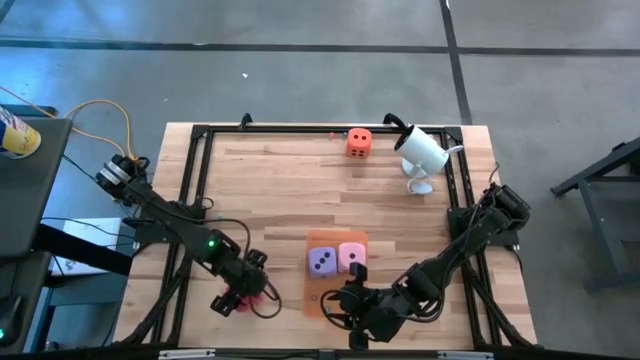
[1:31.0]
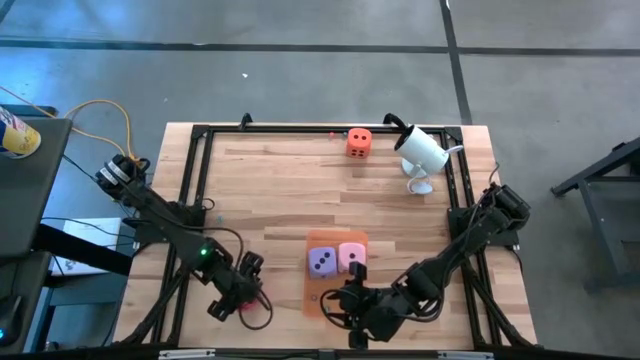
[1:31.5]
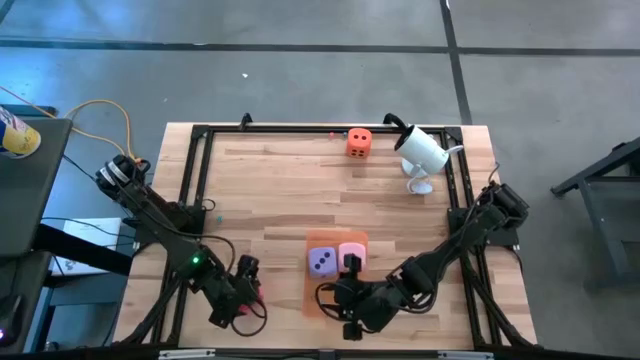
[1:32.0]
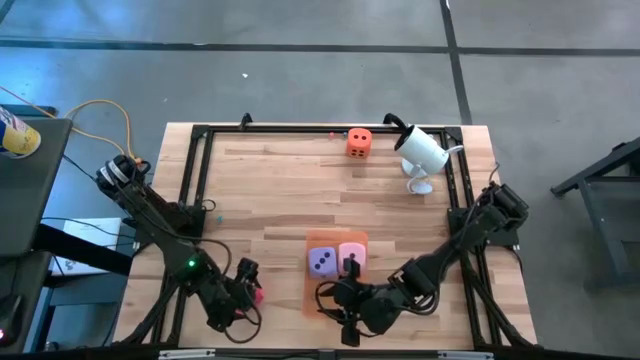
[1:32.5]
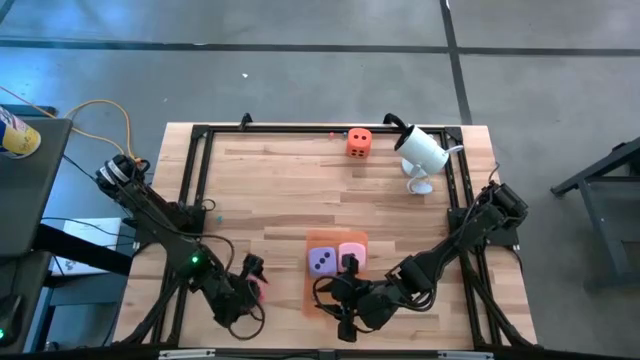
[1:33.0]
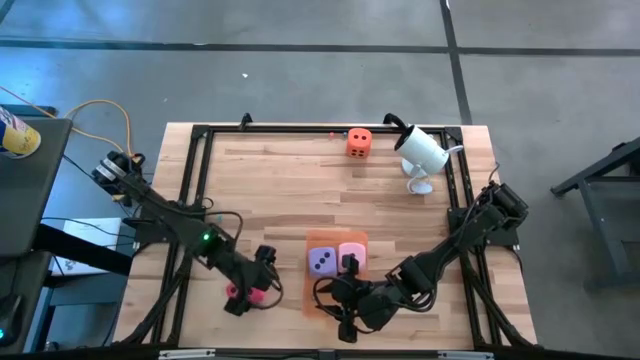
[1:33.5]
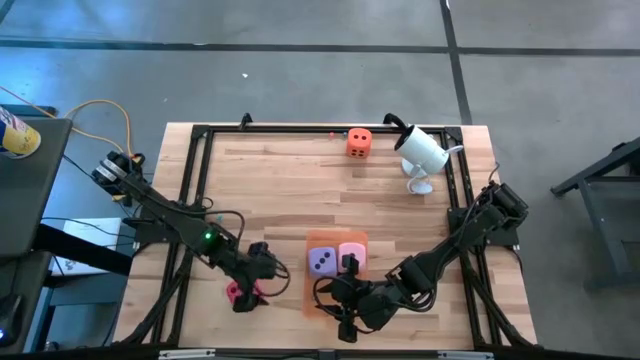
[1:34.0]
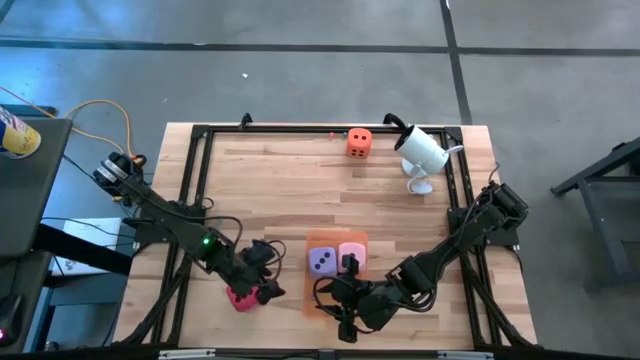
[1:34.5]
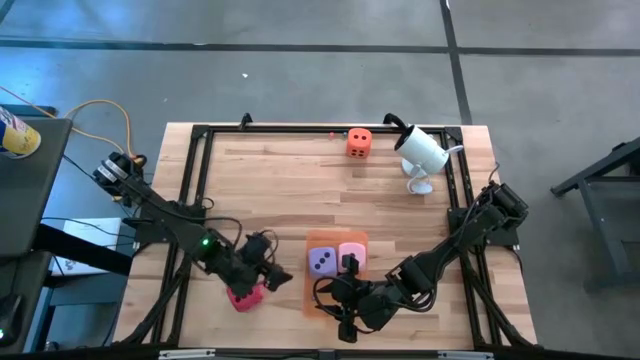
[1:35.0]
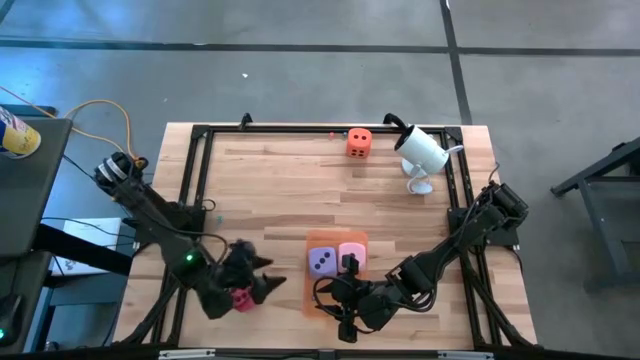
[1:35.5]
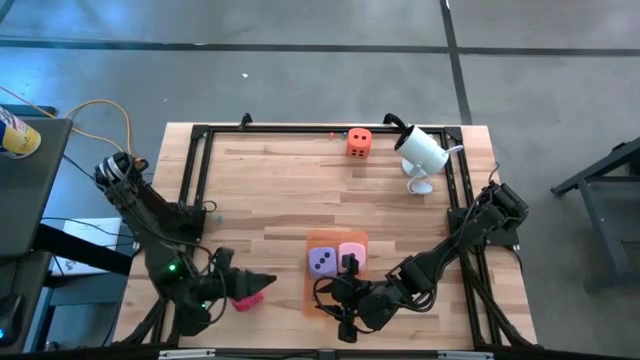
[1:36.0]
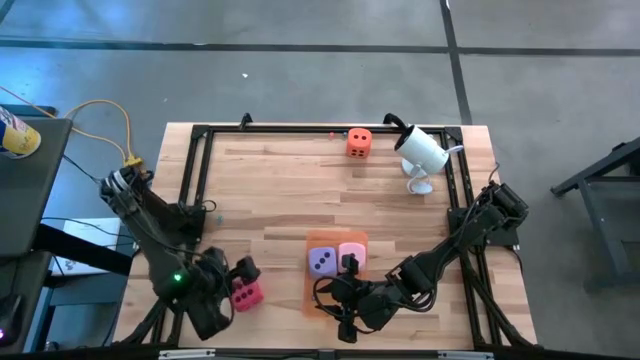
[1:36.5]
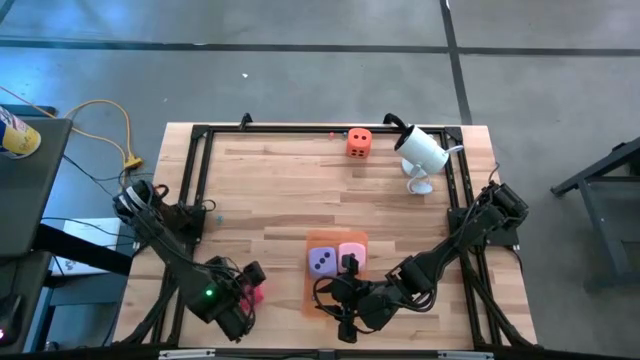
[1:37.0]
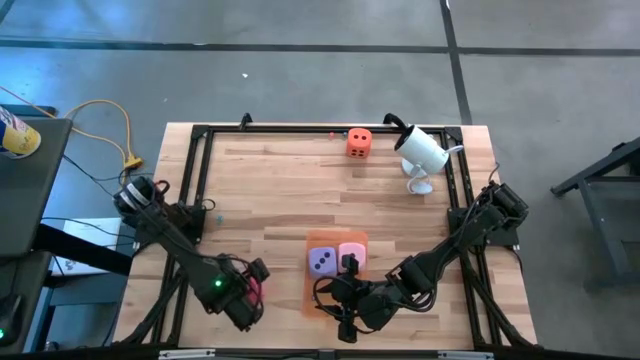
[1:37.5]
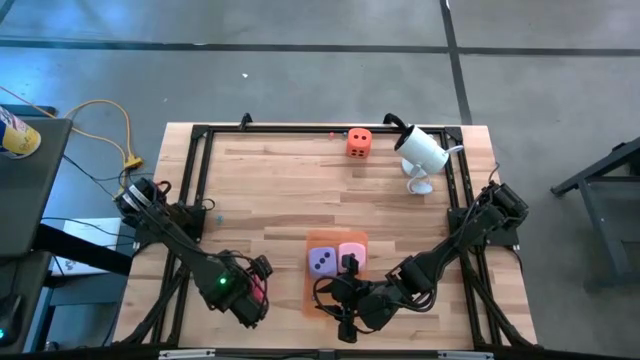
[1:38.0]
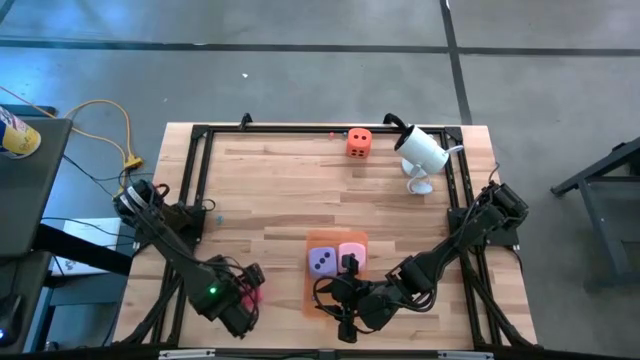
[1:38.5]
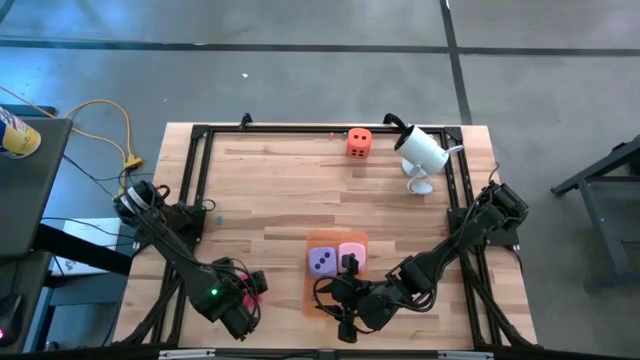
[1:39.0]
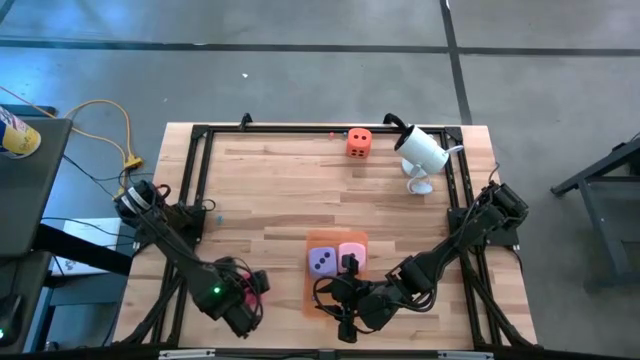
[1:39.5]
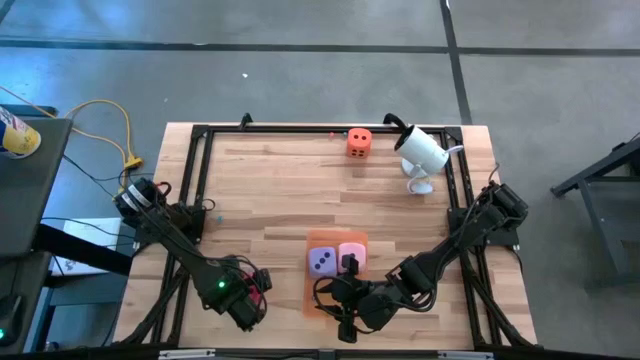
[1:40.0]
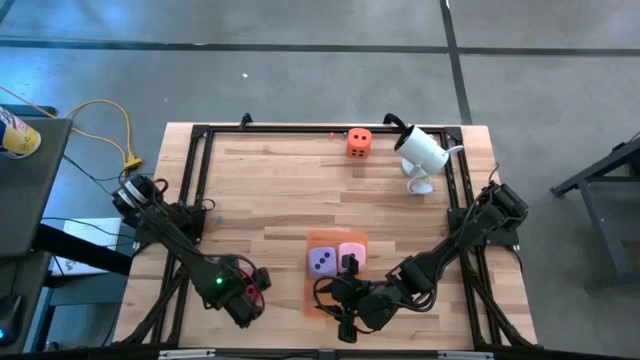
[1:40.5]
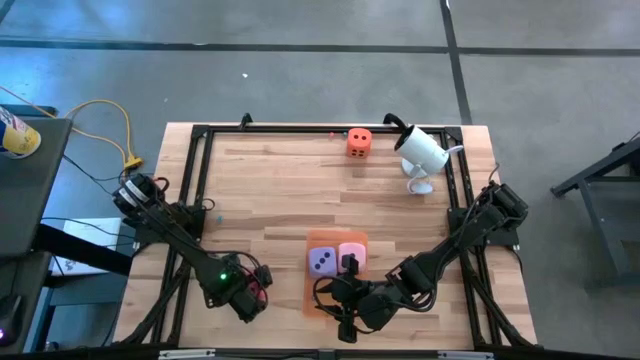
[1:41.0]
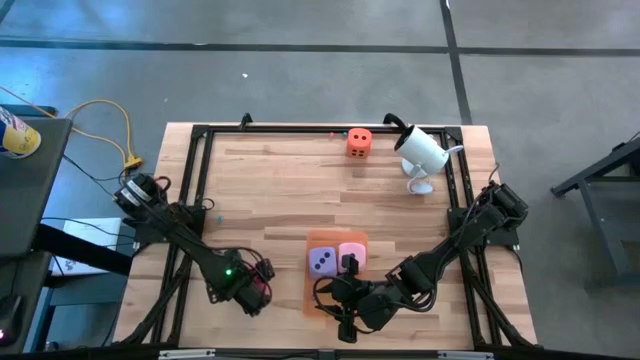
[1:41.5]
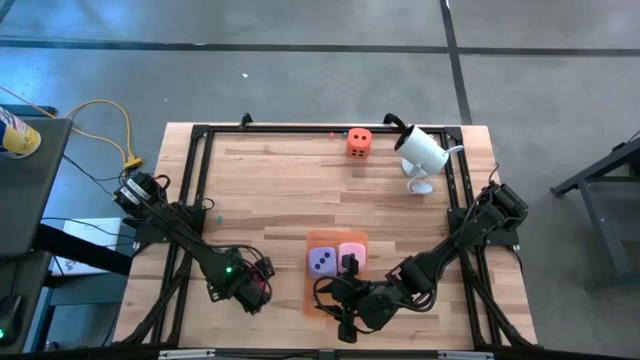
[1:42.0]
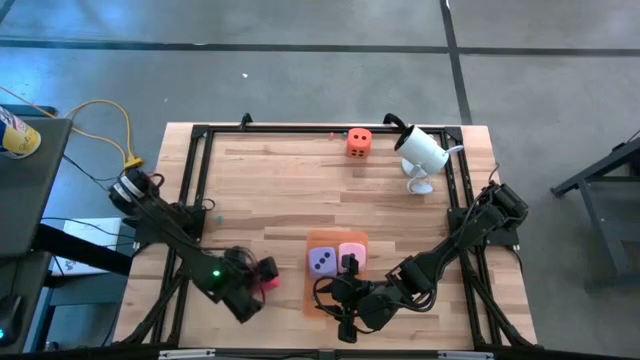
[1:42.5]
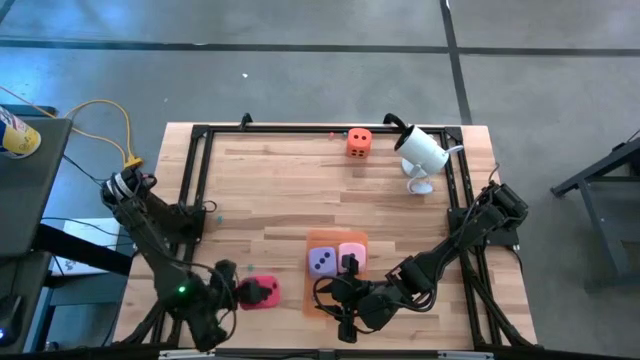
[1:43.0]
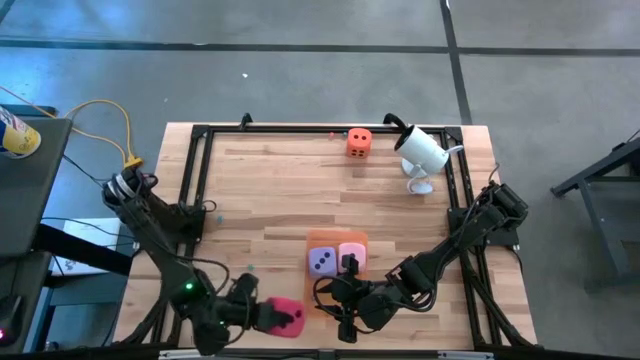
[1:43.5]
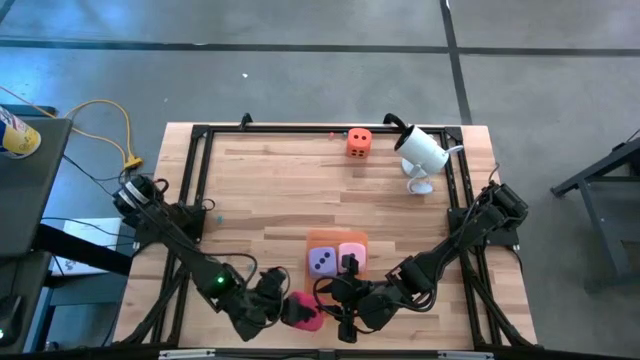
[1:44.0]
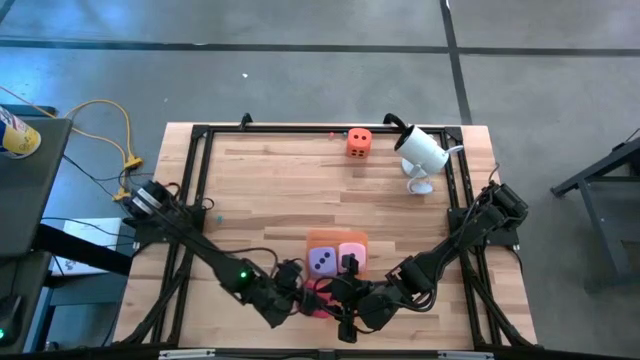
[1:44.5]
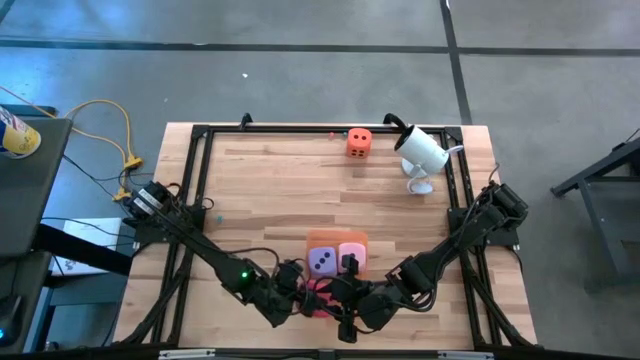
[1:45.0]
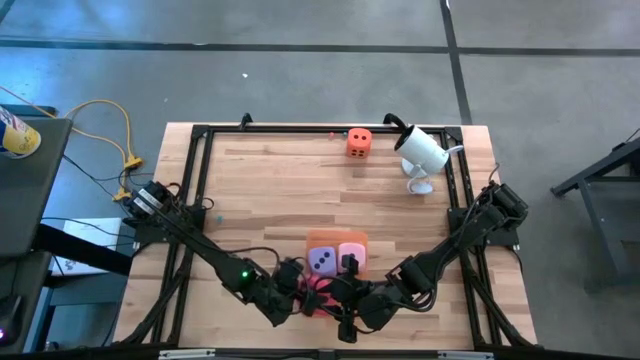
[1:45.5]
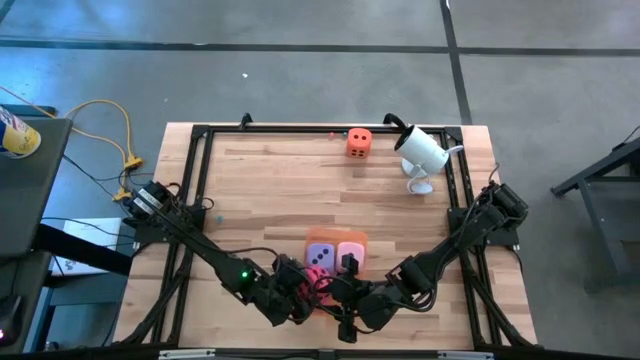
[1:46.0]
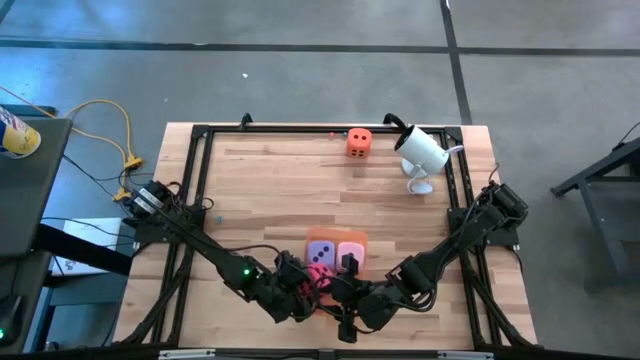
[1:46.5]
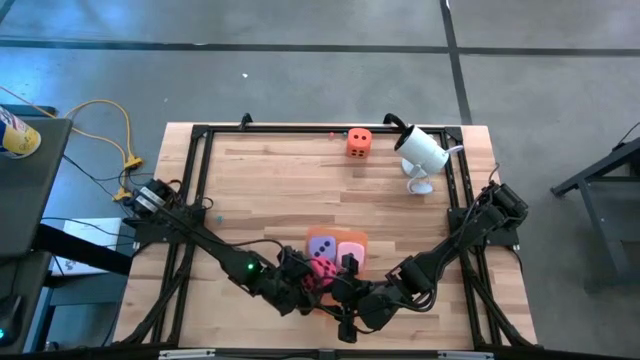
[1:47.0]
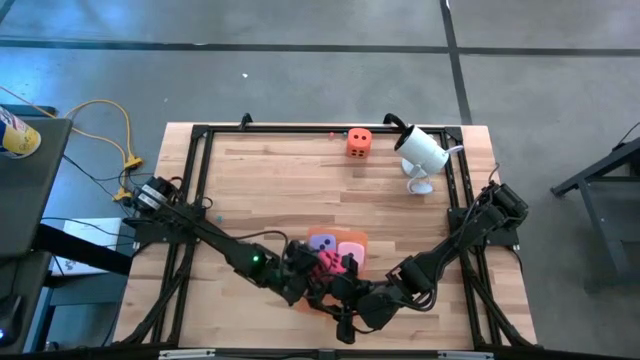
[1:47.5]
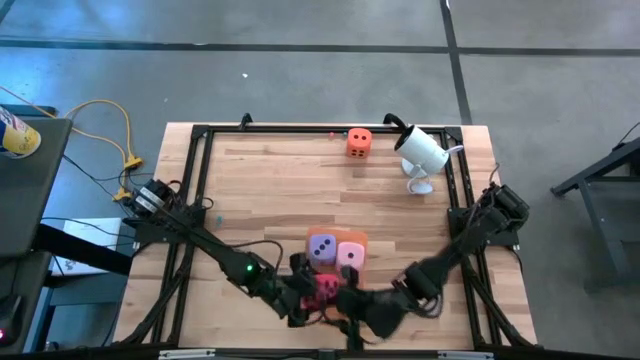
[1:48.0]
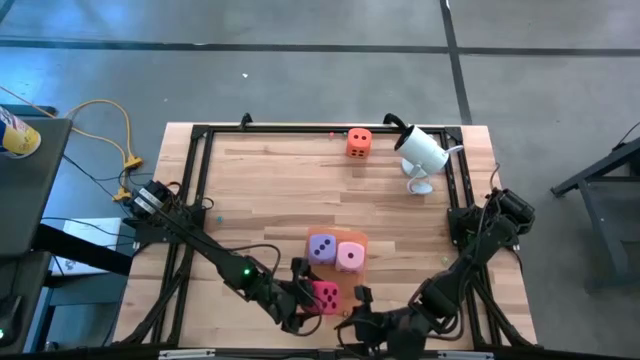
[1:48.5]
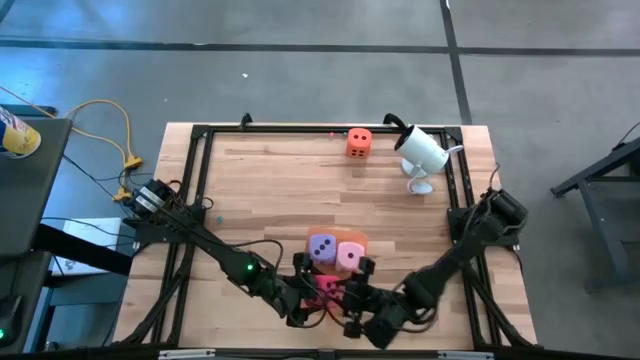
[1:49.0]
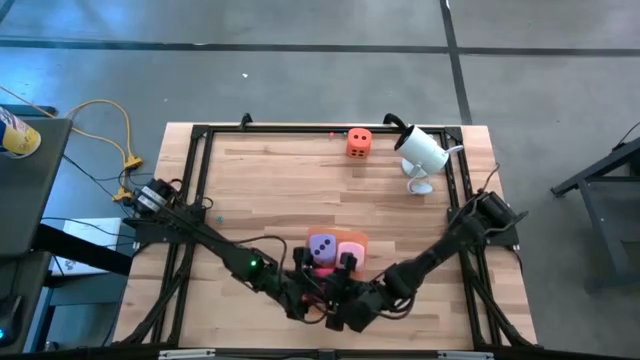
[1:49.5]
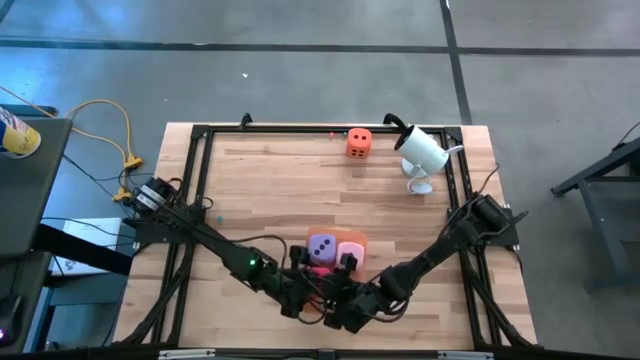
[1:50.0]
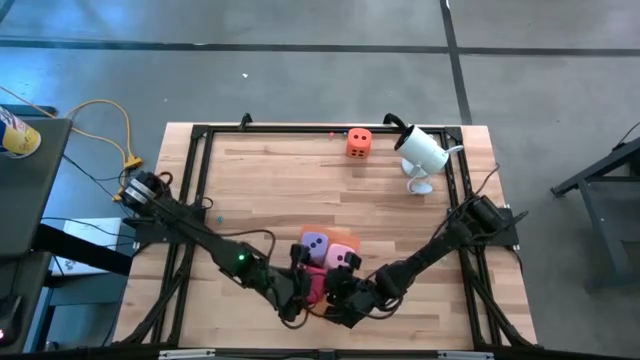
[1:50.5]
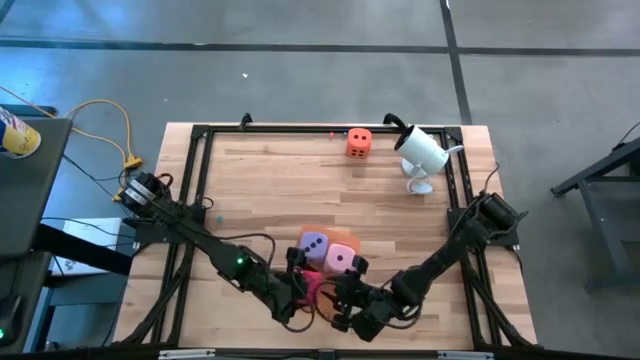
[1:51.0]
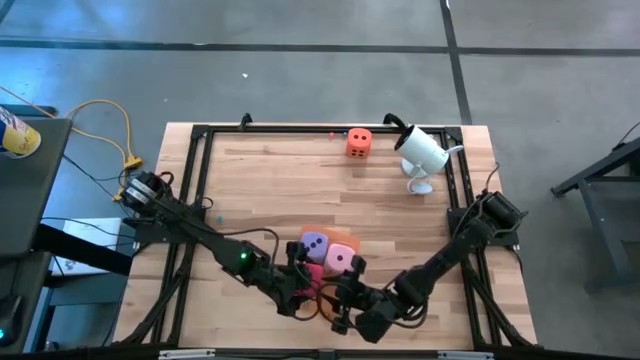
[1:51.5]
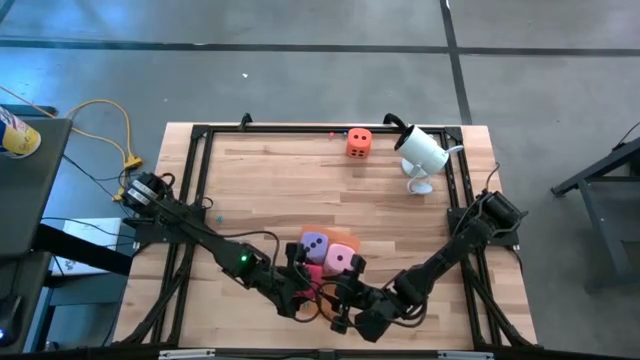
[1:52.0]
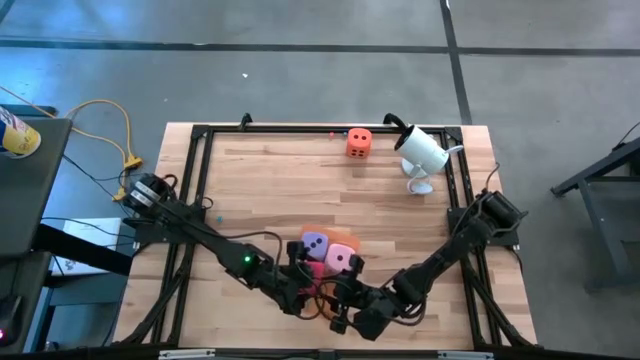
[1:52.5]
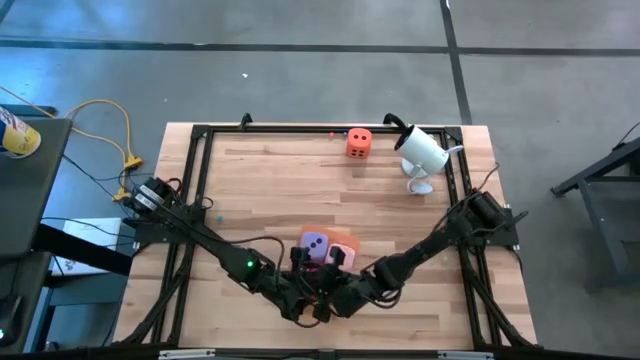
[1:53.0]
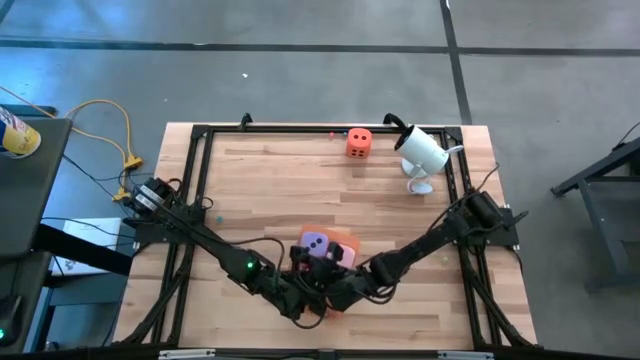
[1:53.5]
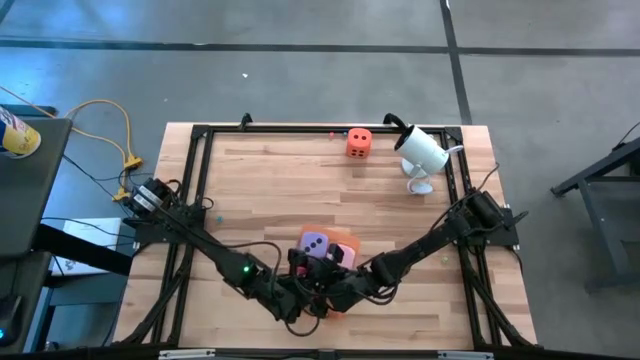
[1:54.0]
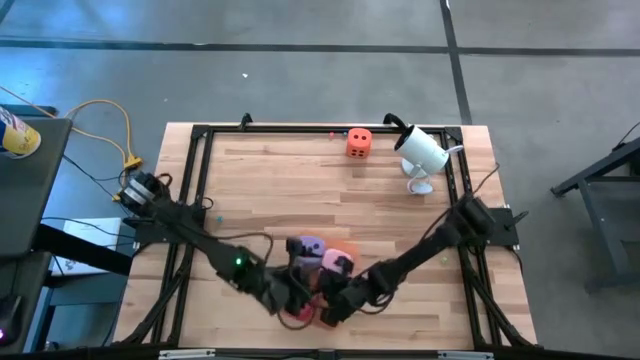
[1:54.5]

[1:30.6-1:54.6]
Task: Pick & Place Dice
Put the large red dice into the orange bin
